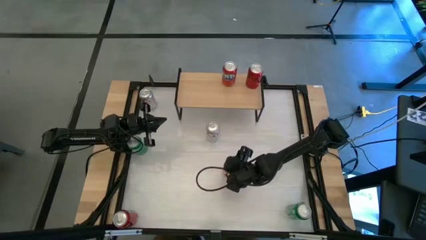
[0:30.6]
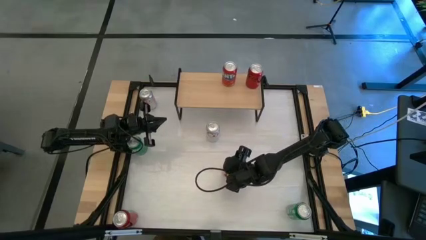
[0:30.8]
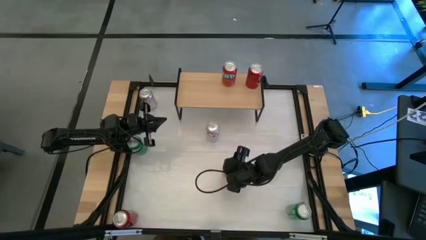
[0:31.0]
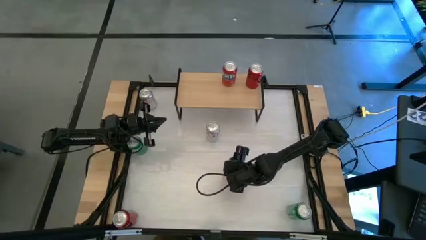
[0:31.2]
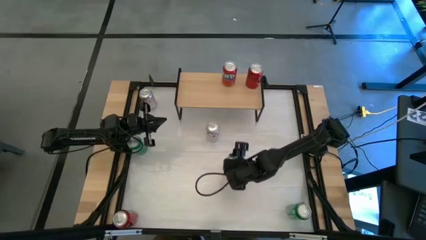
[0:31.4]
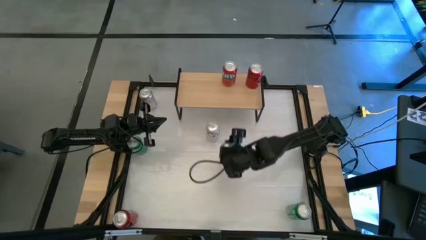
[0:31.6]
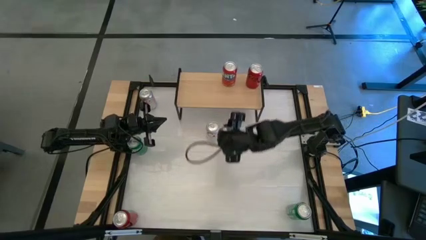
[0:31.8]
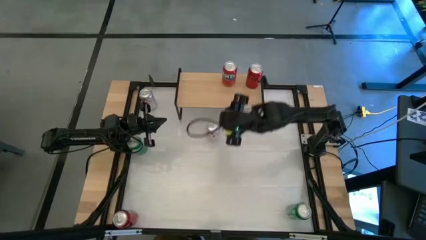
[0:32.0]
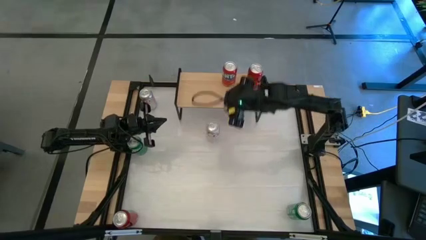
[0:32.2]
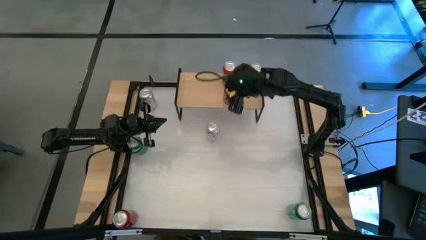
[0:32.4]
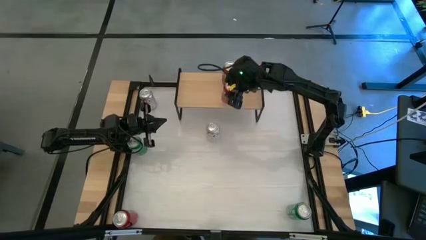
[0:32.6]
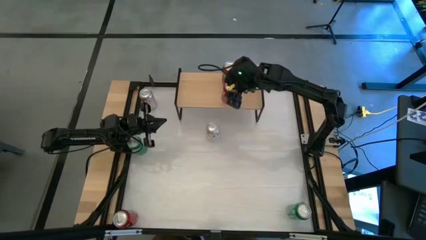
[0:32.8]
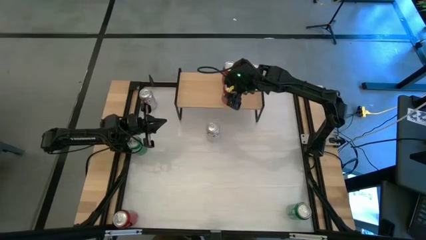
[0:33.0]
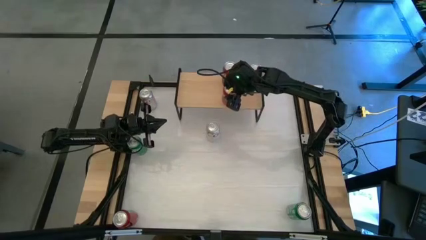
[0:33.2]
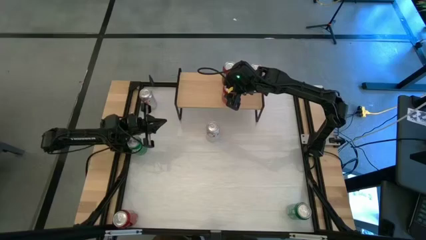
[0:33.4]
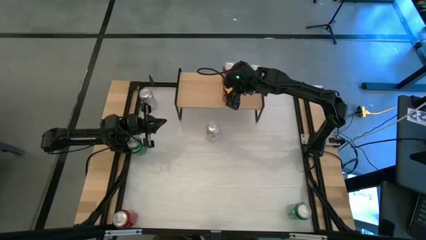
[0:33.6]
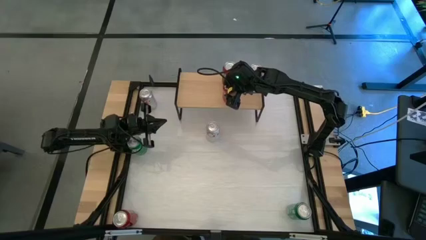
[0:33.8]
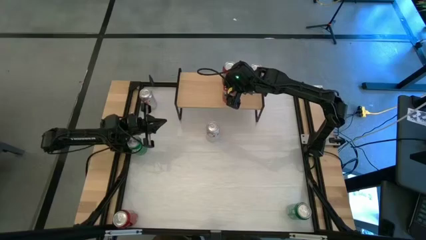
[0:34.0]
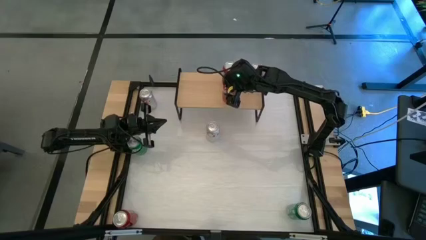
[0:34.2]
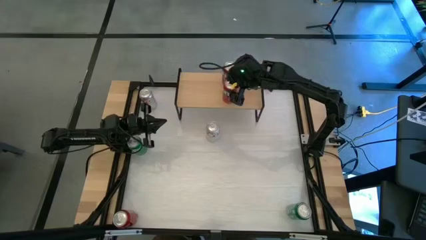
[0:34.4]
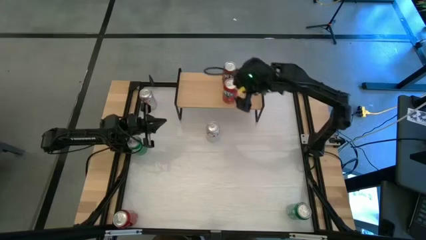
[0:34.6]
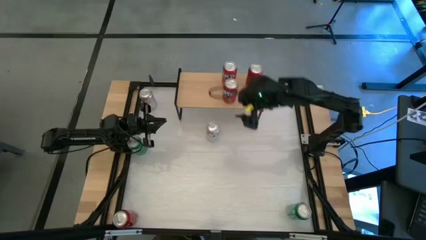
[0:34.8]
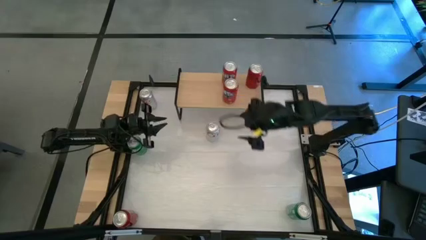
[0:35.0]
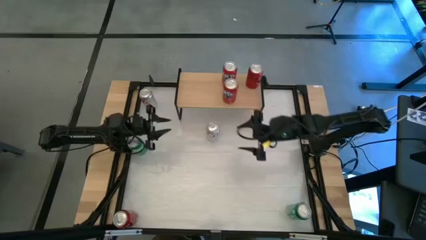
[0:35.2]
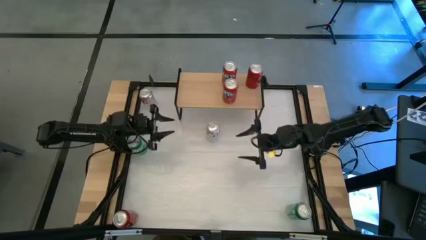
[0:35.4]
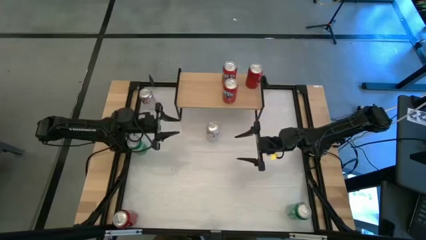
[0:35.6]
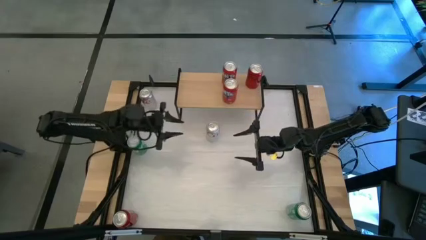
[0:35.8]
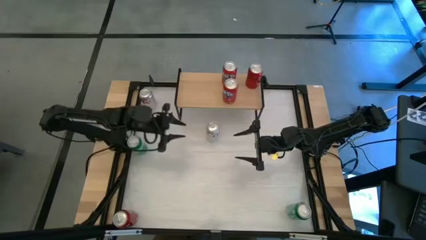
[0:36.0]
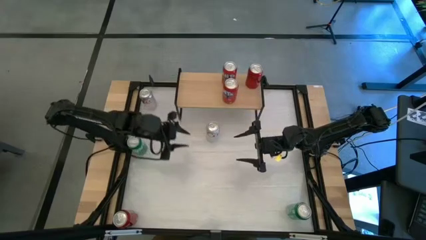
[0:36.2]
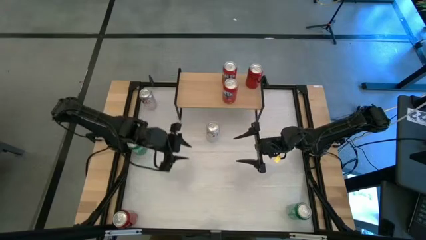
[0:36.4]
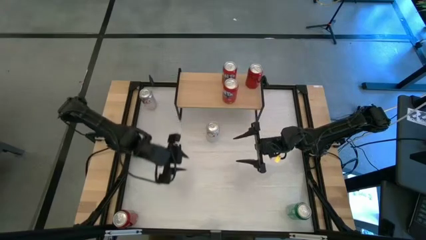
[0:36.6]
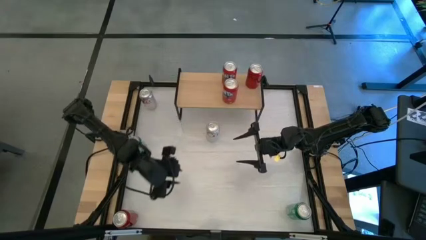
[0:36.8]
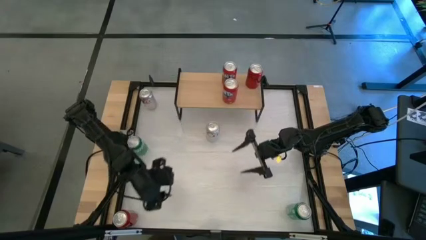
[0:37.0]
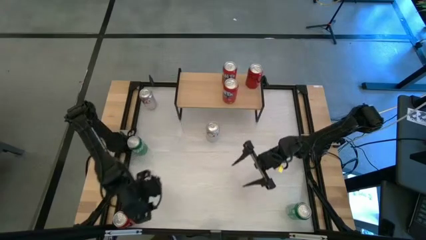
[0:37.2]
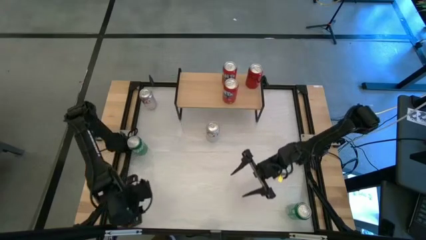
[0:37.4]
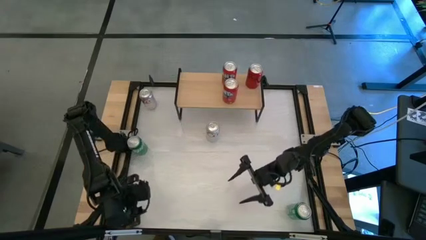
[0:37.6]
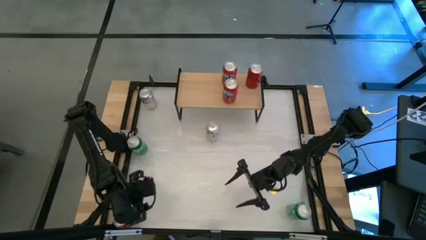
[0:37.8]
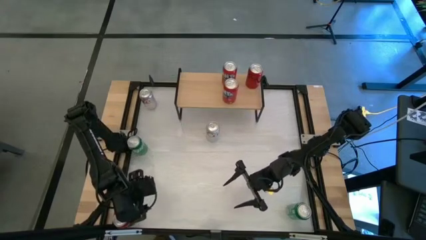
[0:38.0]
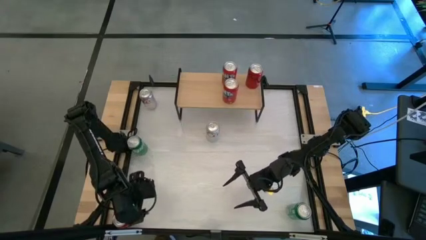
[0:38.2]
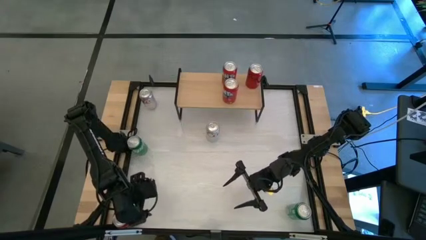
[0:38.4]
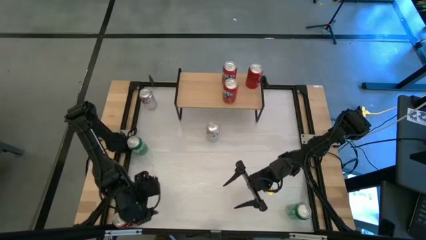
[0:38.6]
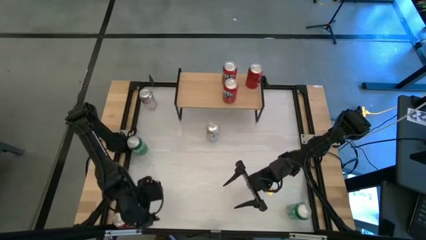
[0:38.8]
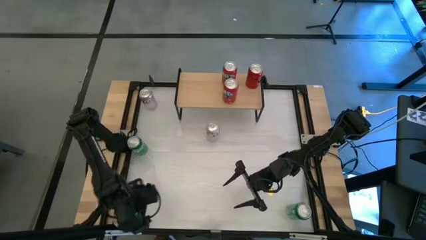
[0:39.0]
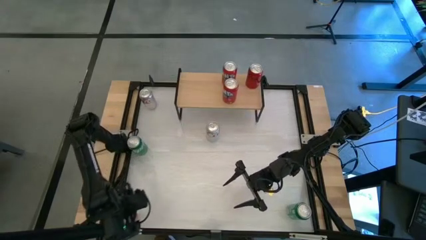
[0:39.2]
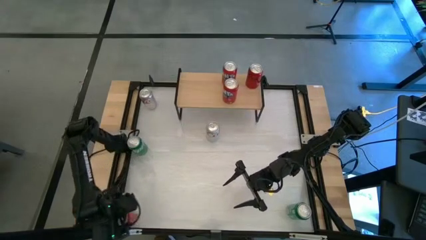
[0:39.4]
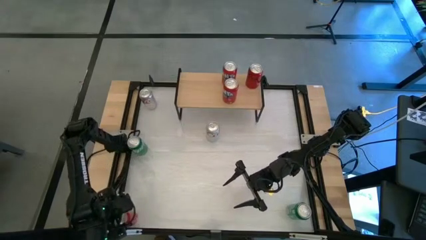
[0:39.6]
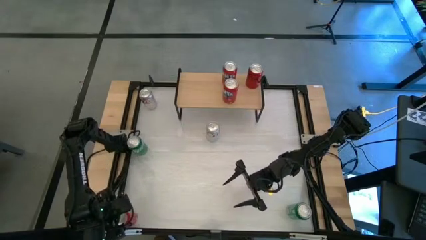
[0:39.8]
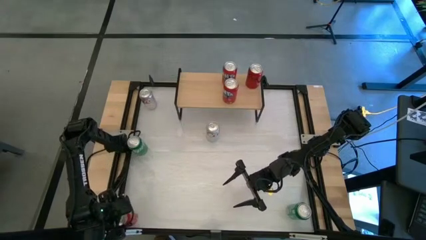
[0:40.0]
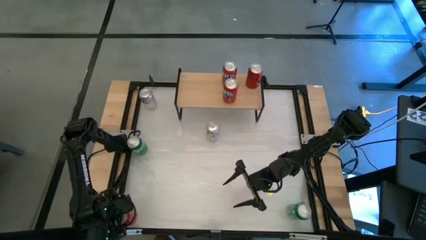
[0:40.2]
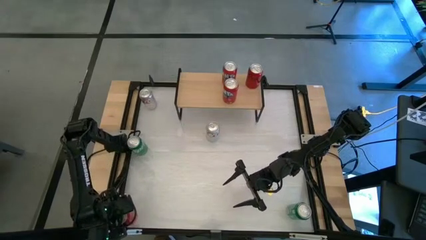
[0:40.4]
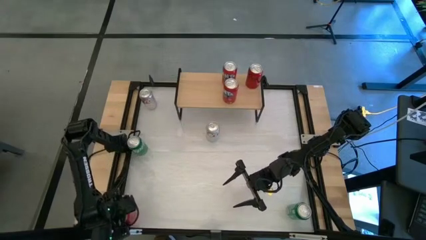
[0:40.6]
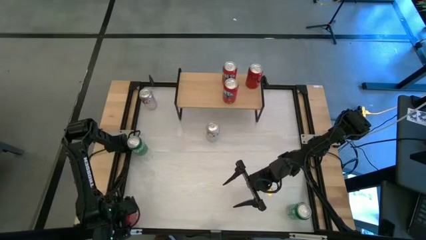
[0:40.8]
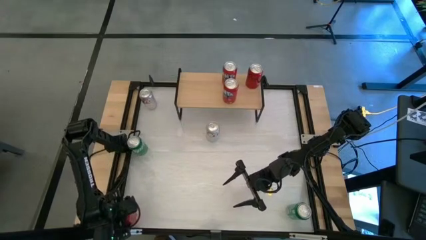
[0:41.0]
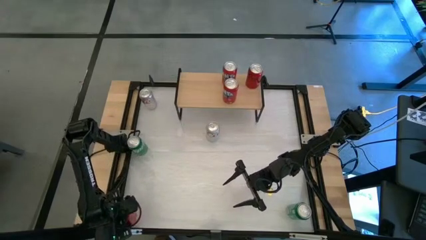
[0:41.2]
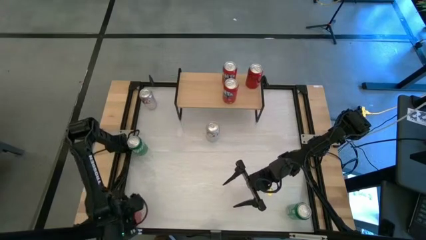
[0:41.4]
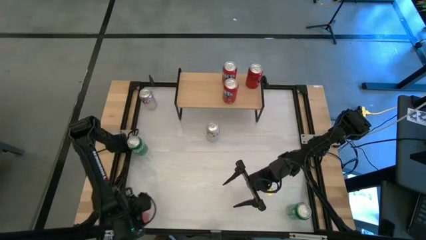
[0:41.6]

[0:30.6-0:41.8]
Task: Place canned beverage on shelf
Put the red soda can on the shelf and align with the other red soda can
